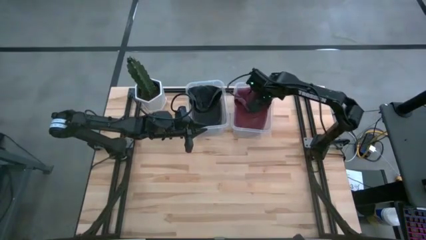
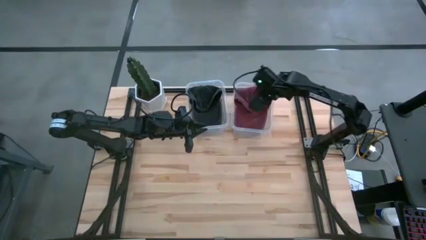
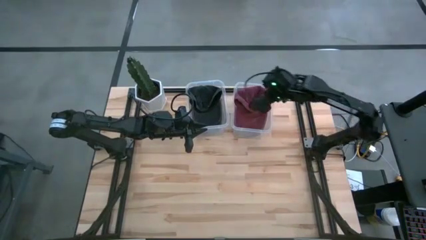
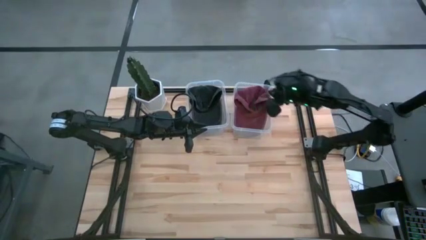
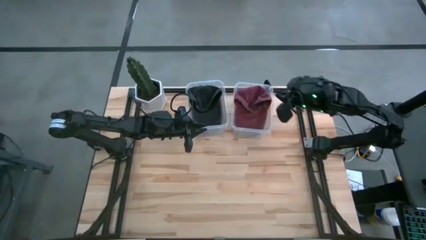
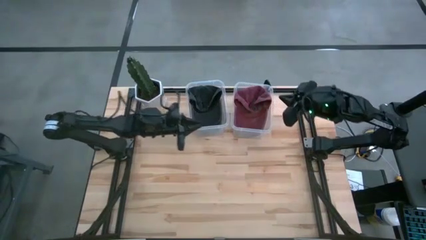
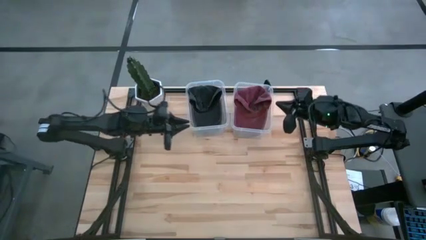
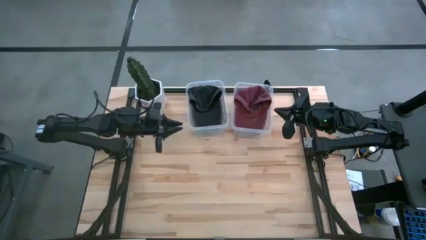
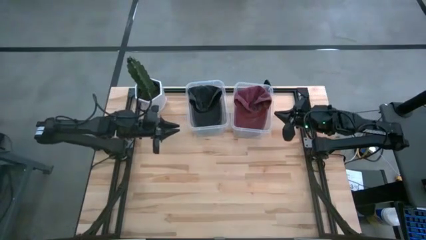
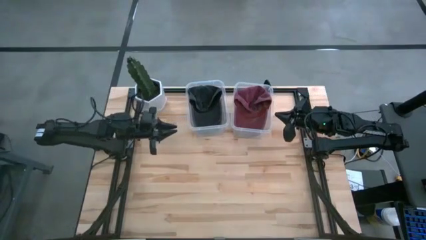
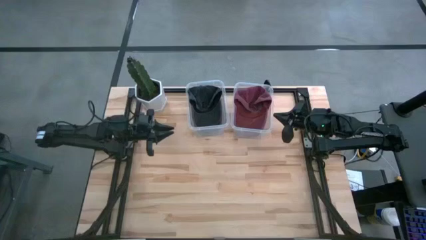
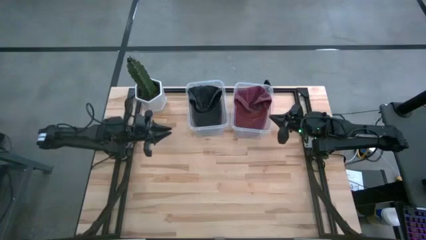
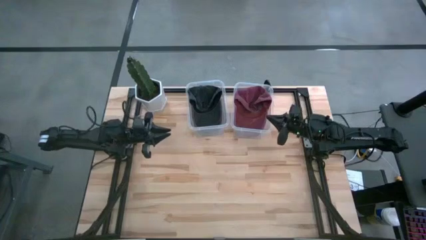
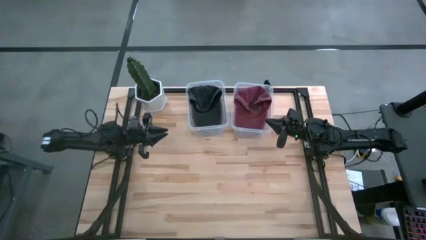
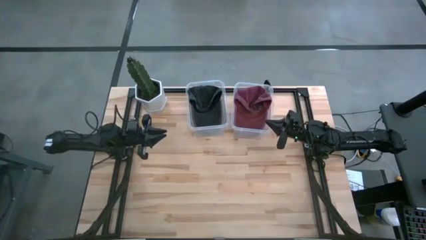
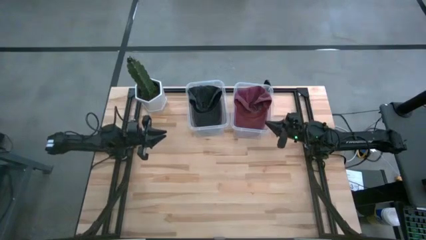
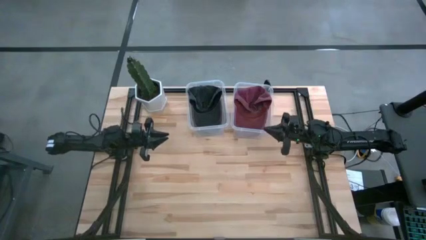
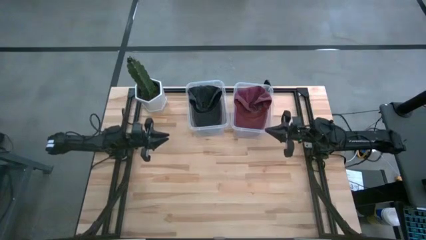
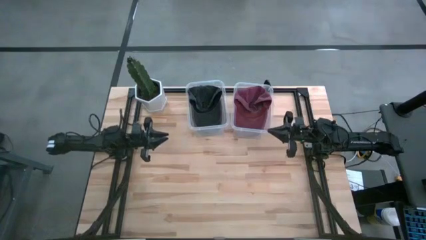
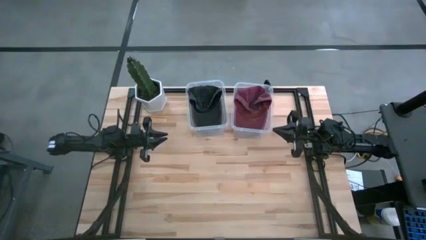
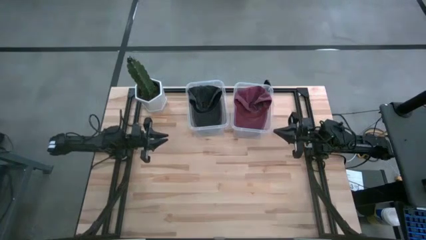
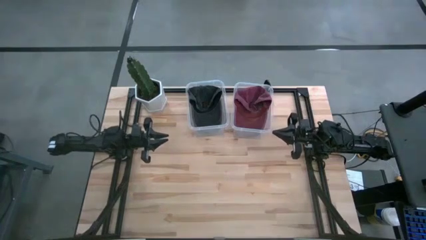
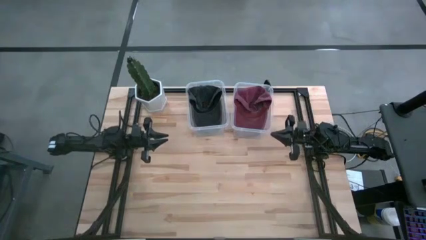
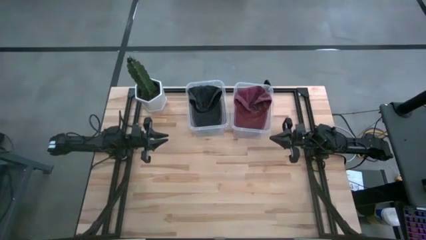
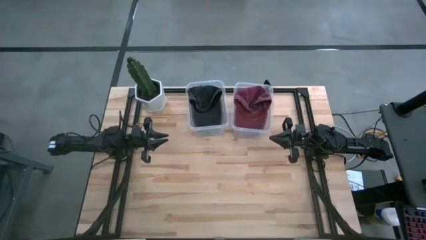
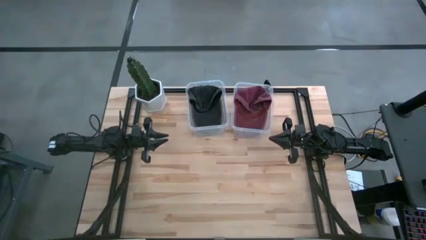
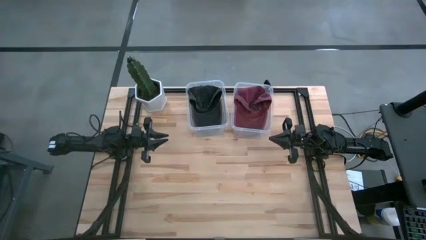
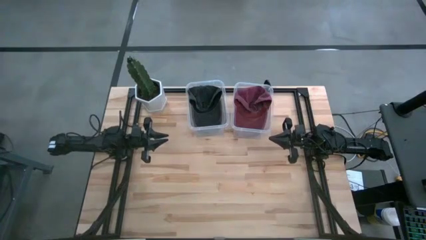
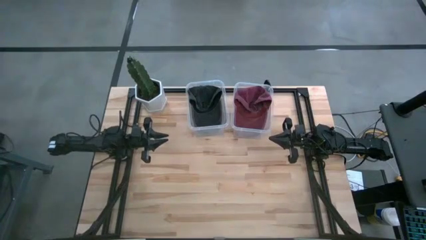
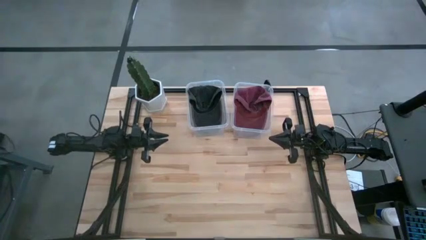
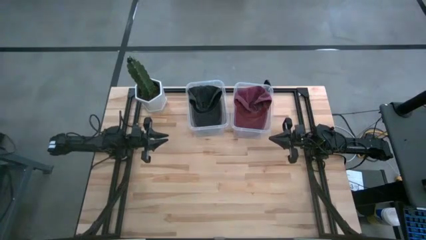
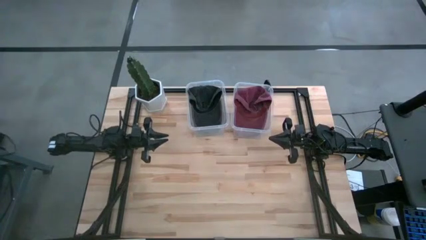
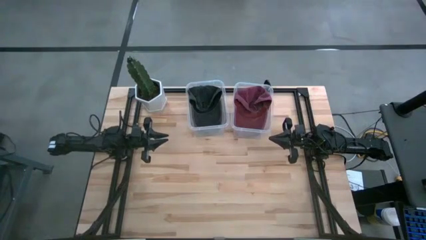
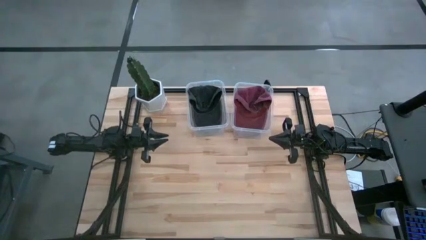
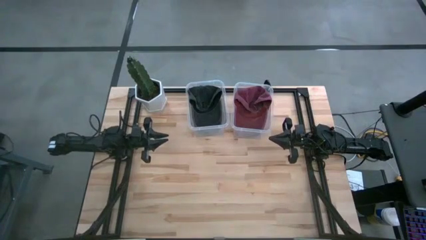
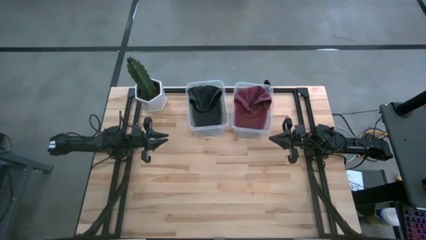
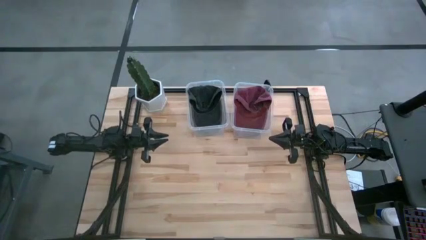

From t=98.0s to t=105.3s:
Task: Pick & Place hat
Return to Home Position
